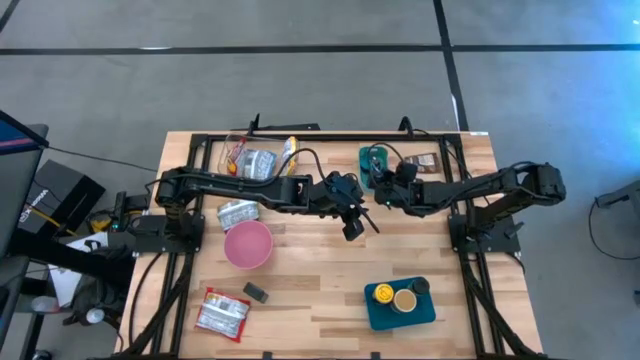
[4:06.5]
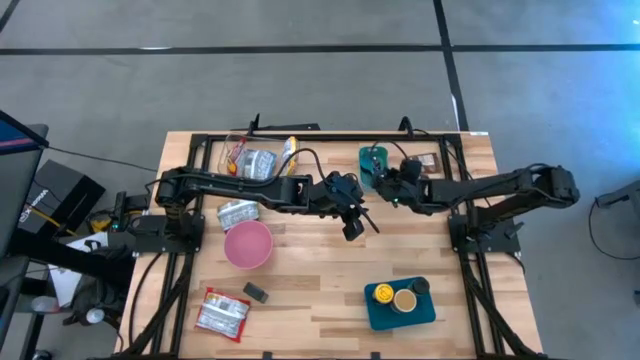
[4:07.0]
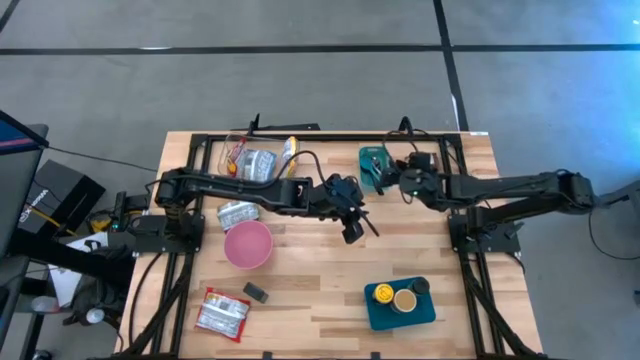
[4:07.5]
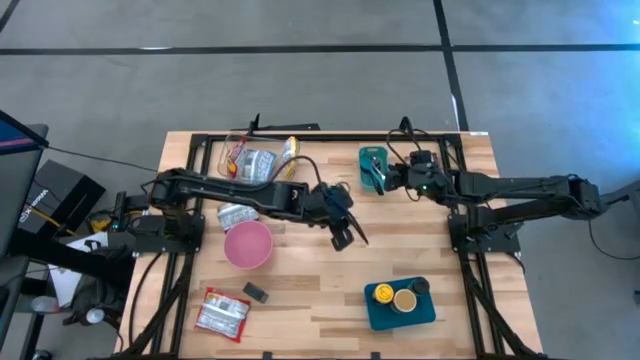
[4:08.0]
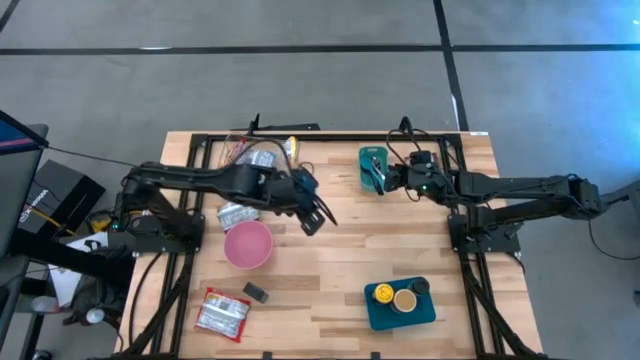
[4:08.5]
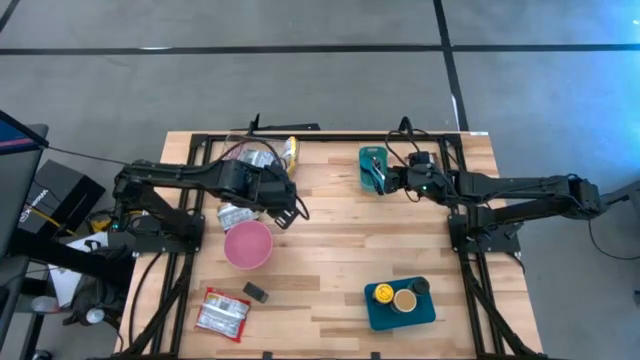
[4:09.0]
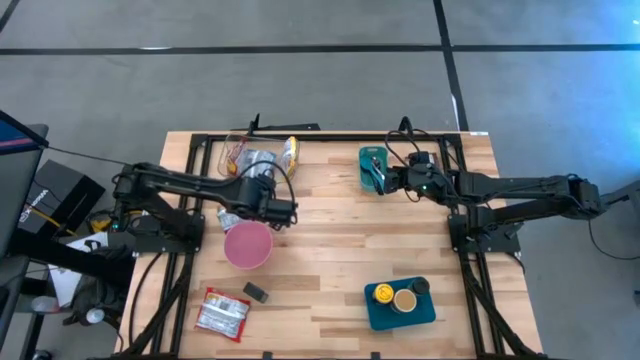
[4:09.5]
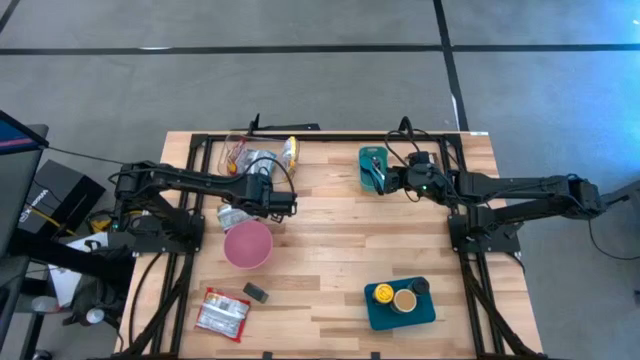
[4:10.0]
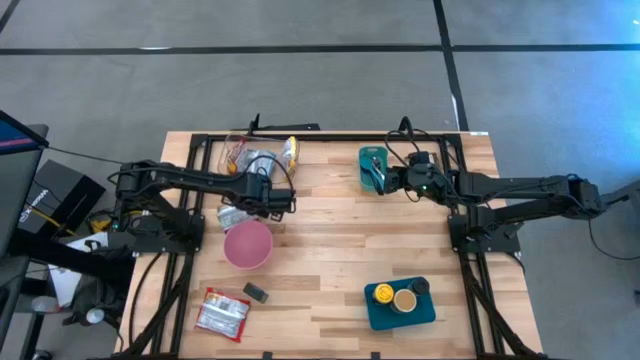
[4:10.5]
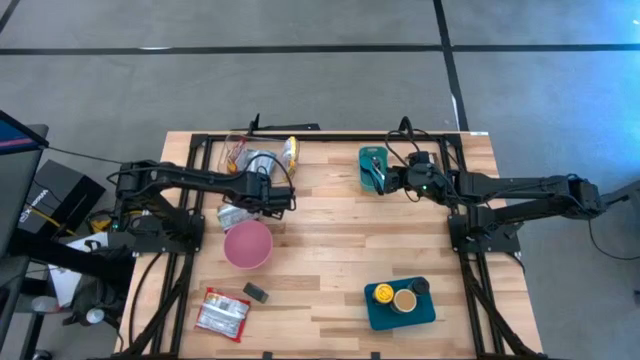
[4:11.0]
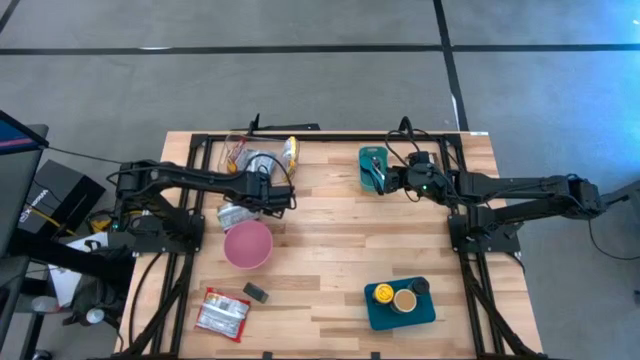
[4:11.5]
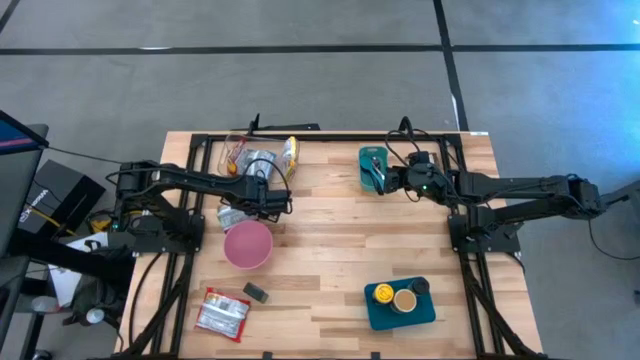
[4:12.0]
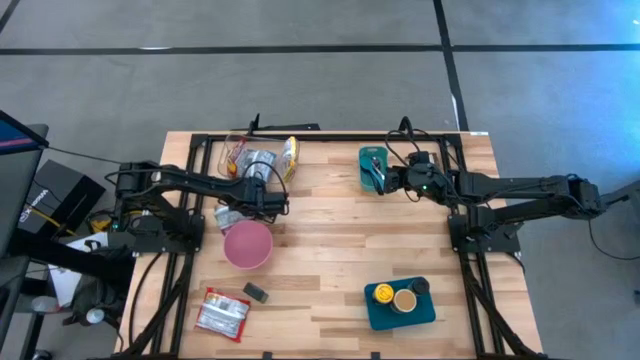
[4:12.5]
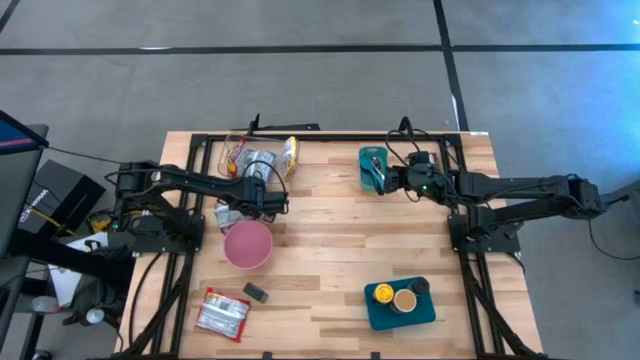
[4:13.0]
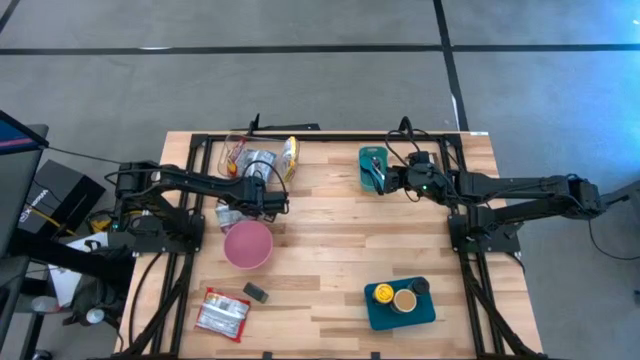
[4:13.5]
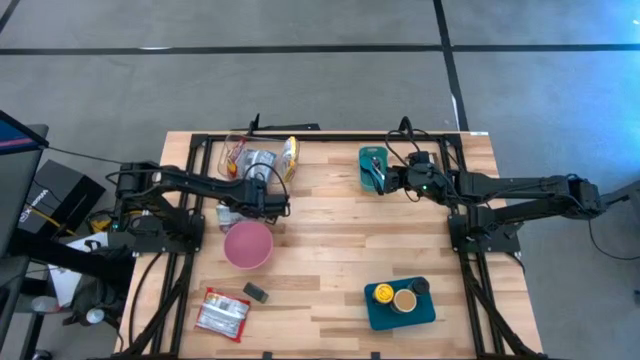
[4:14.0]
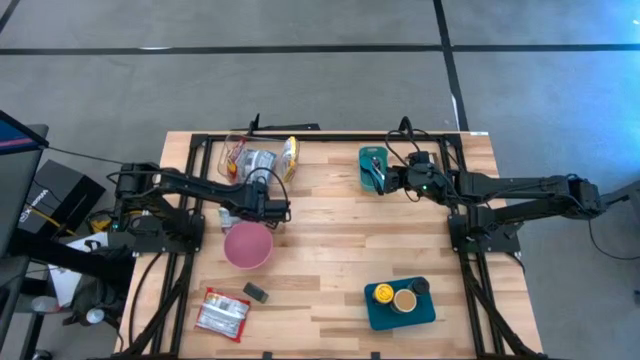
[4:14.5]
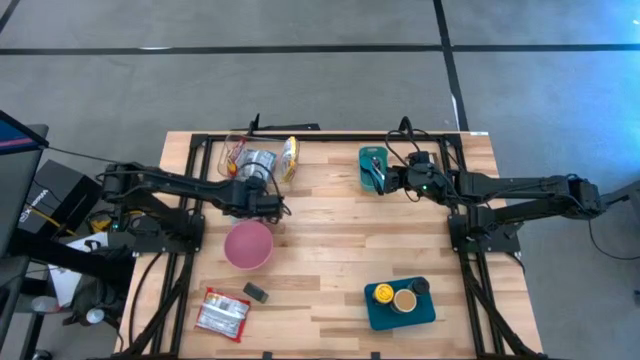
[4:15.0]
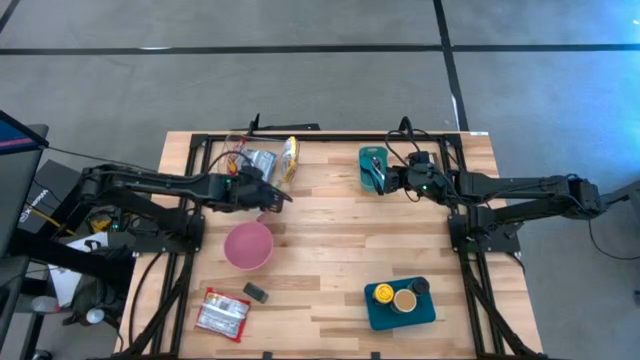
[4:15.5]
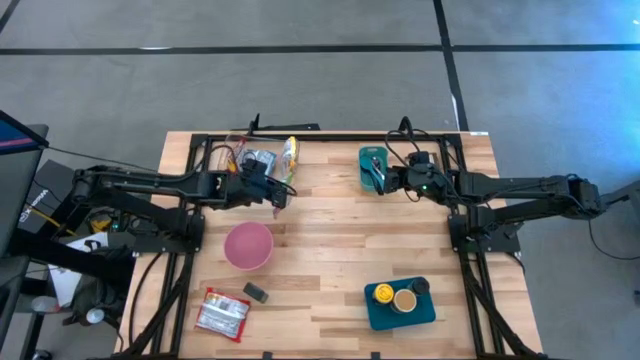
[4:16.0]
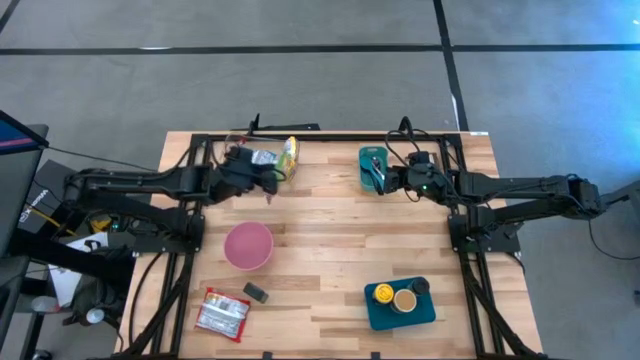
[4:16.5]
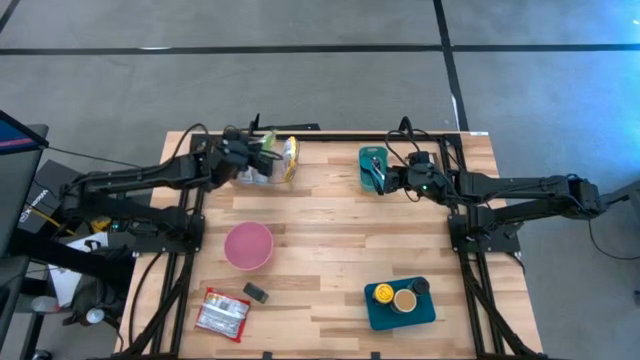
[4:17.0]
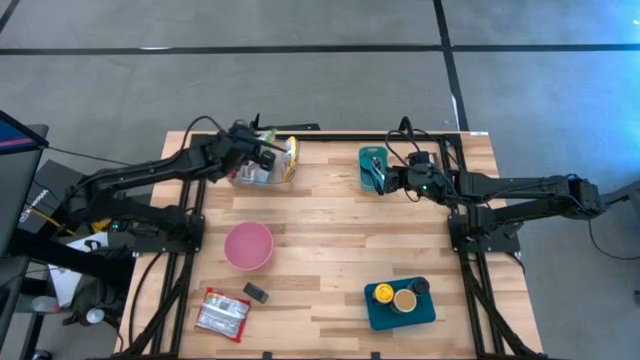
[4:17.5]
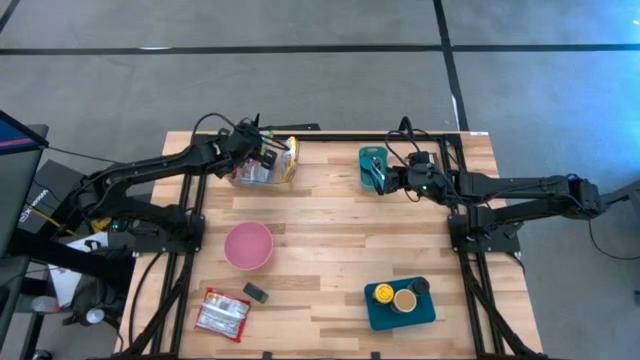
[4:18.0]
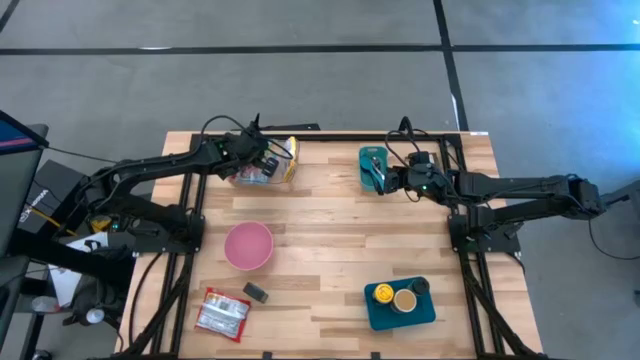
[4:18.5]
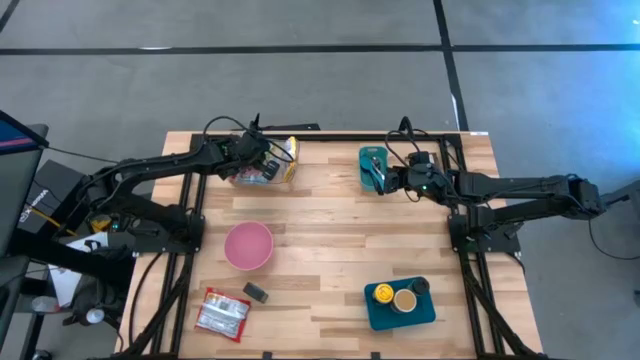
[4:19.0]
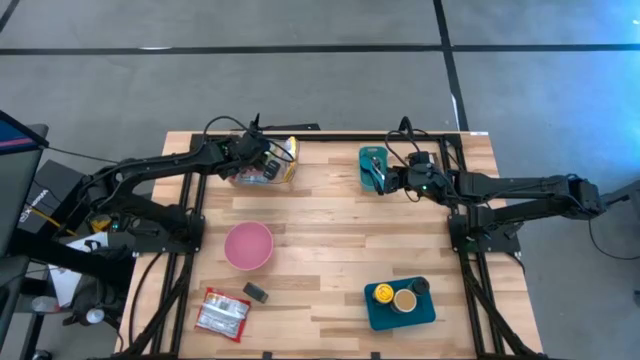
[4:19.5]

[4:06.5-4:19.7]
Task: Pick & Place Food Item
Put the green noodle pack into the transparent bin

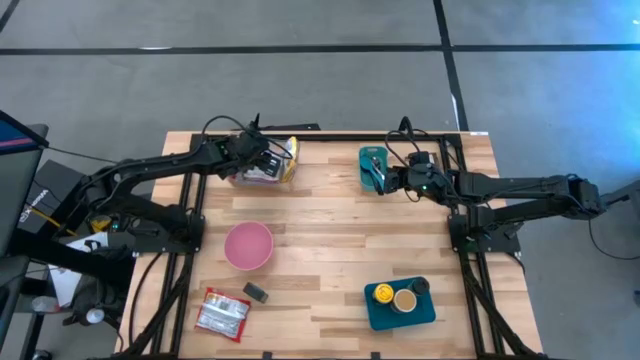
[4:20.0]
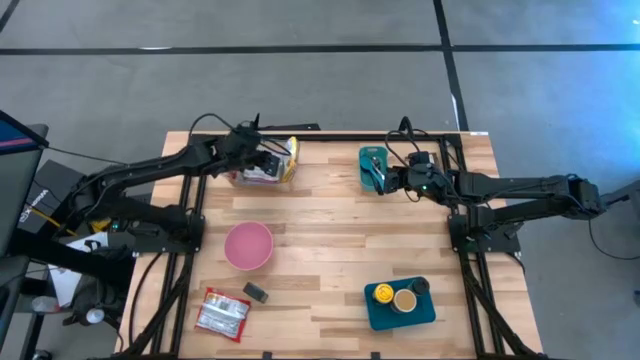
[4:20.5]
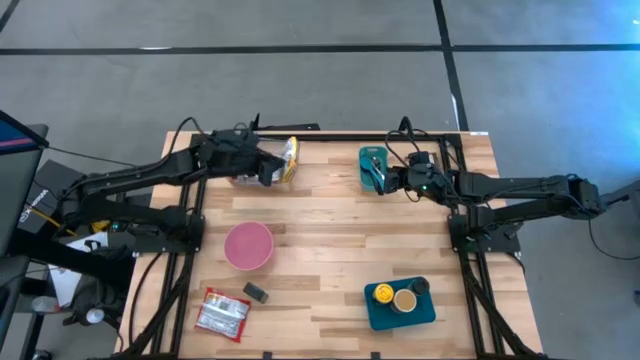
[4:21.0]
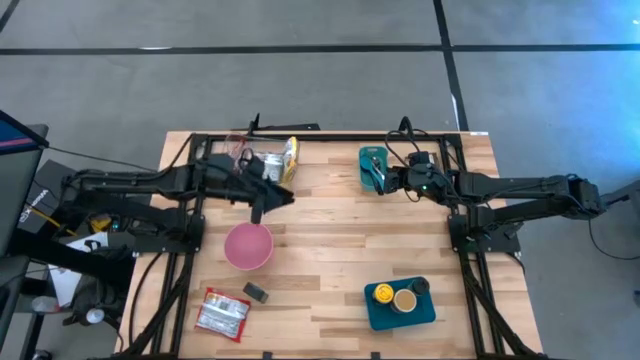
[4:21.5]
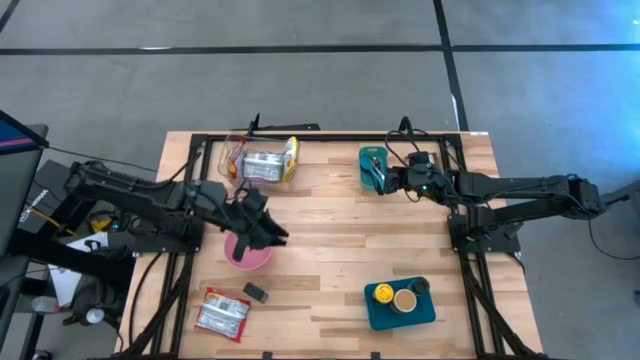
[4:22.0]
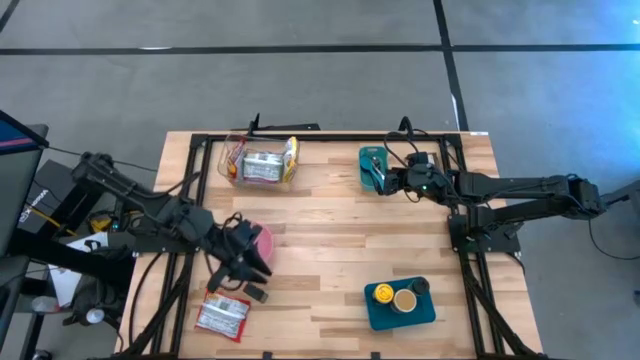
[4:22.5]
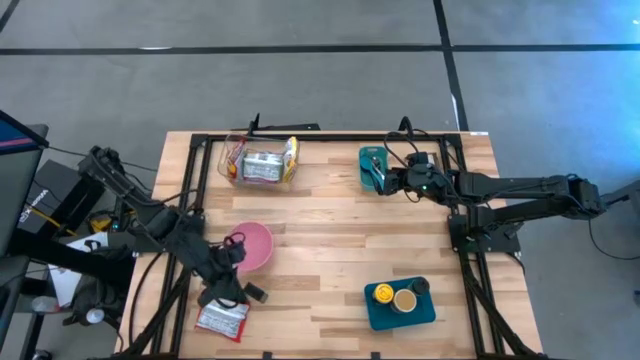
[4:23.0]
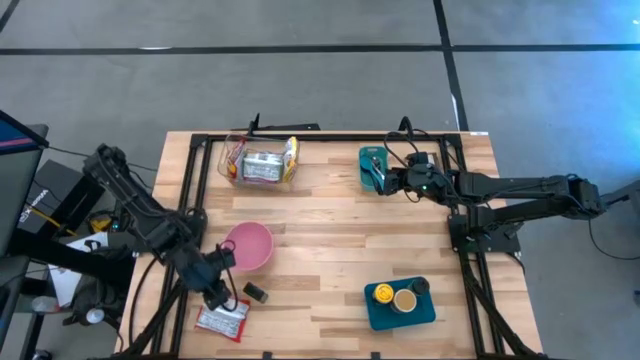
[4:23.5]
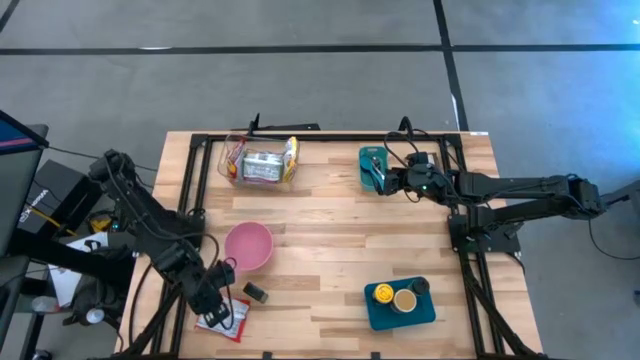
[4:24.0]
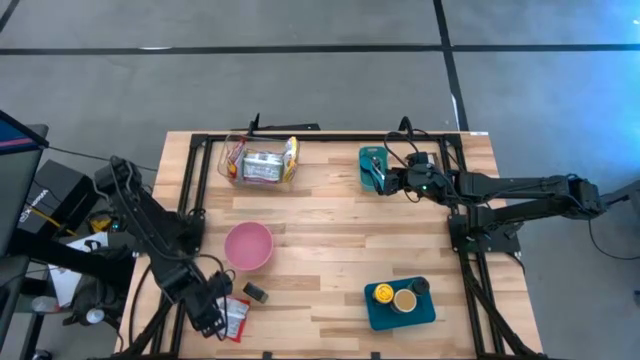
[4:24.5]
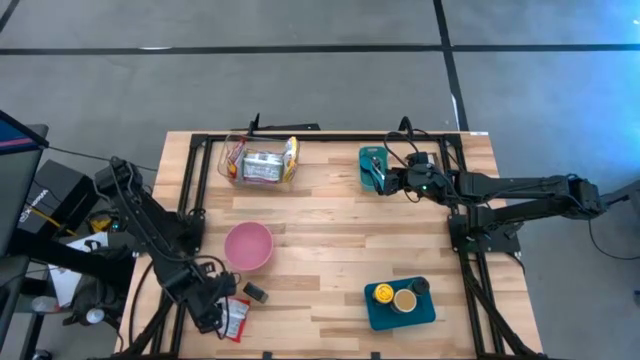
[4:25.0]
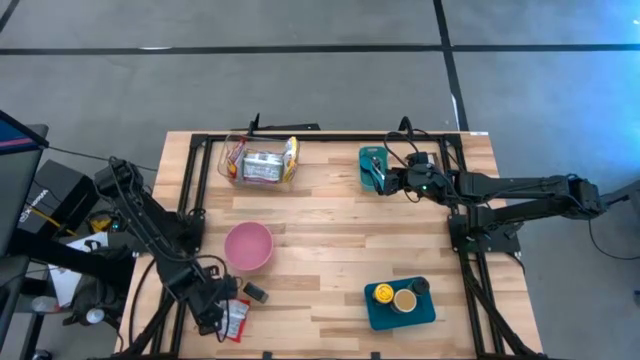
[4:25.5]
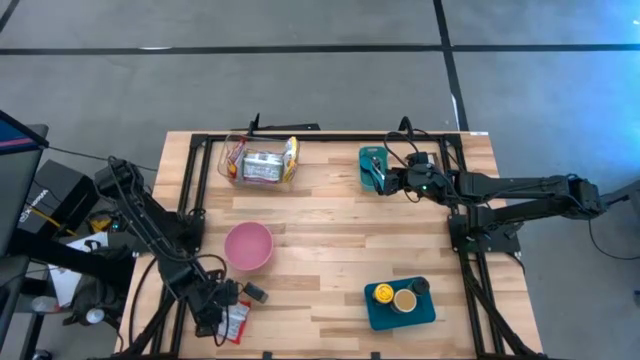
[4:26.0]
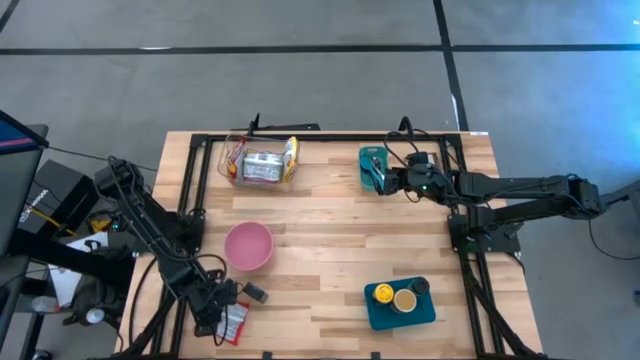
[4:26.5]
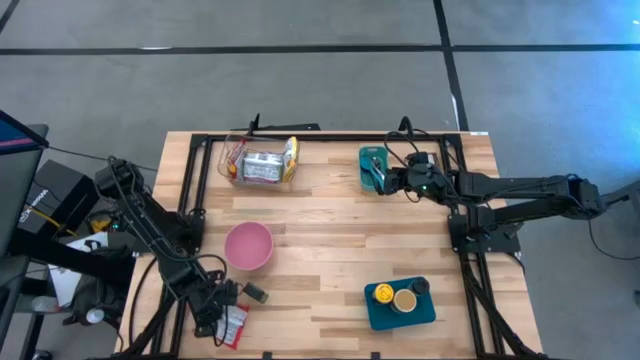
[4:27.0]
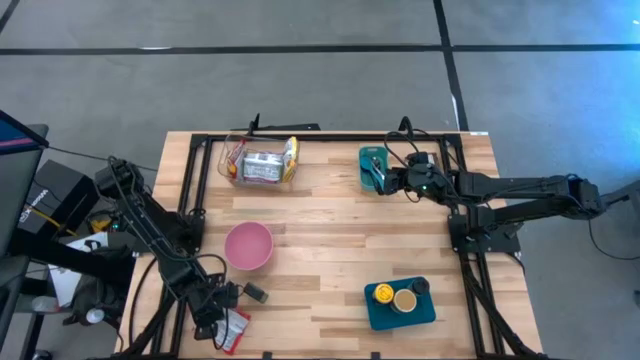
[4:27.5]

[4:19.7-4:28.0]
Put the orange noodle pack into the transparent bin
